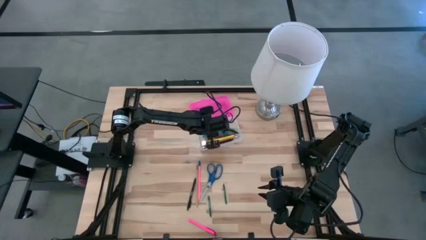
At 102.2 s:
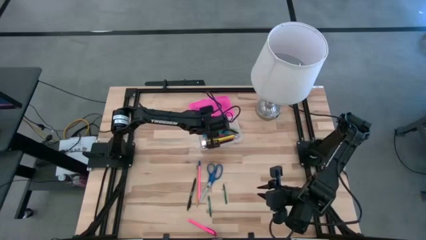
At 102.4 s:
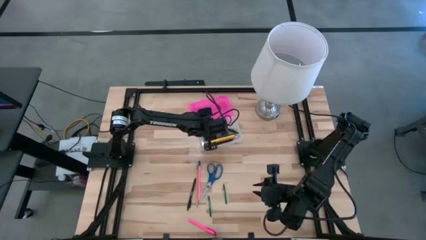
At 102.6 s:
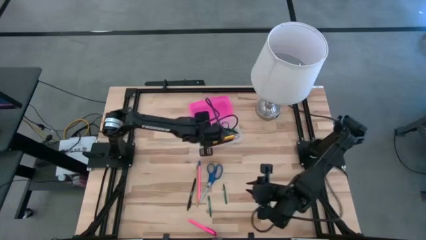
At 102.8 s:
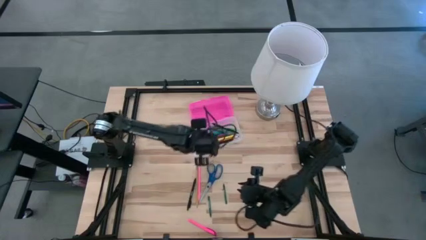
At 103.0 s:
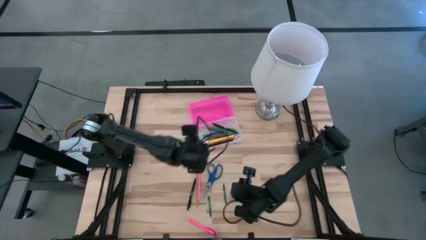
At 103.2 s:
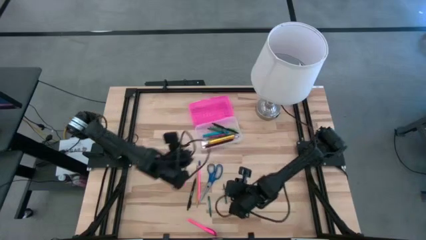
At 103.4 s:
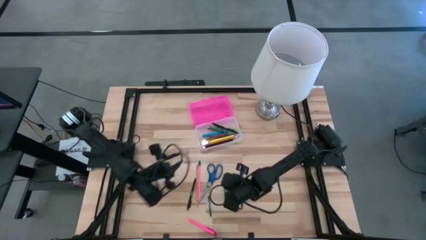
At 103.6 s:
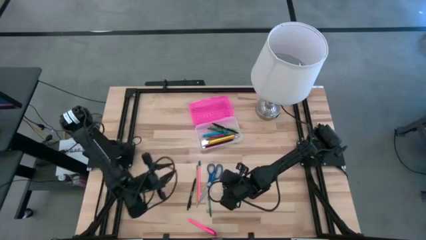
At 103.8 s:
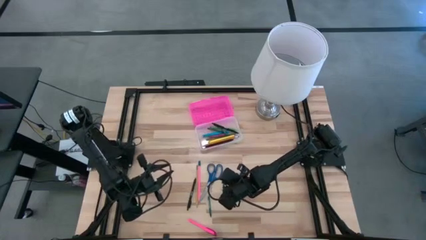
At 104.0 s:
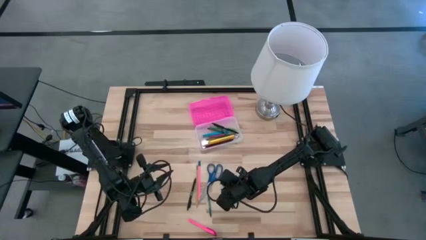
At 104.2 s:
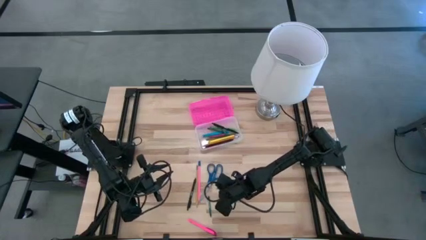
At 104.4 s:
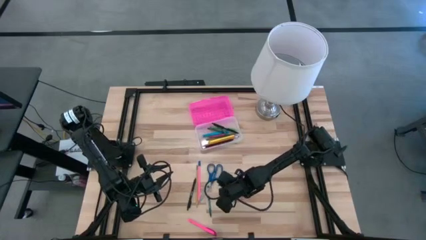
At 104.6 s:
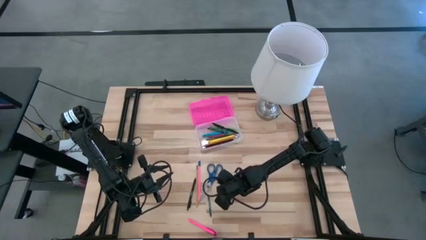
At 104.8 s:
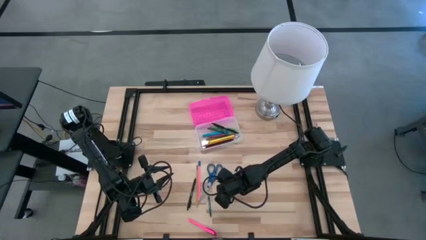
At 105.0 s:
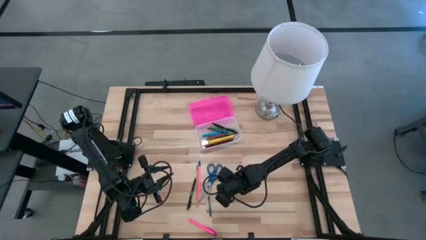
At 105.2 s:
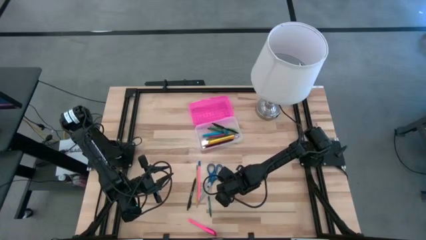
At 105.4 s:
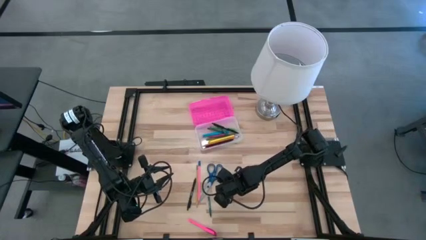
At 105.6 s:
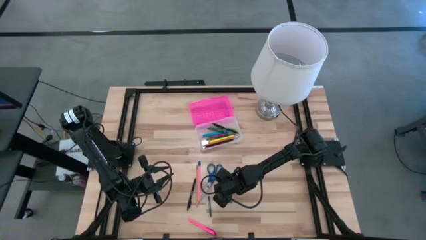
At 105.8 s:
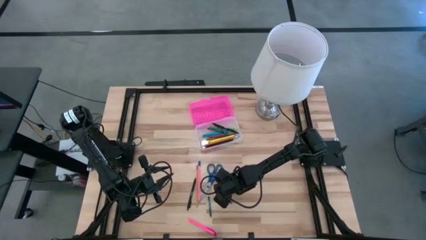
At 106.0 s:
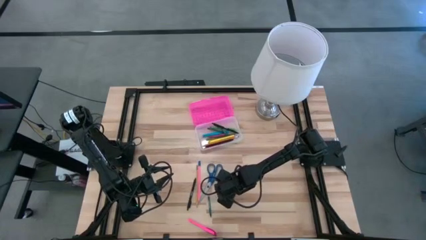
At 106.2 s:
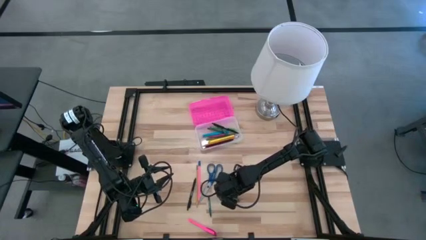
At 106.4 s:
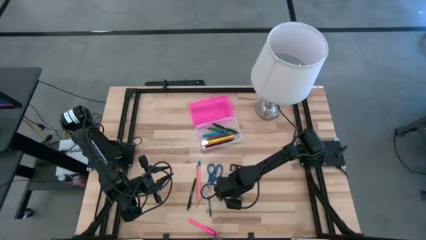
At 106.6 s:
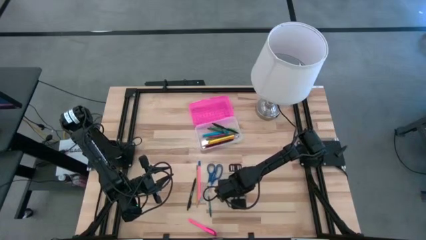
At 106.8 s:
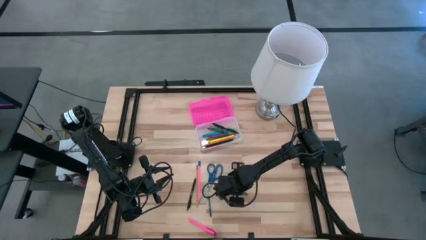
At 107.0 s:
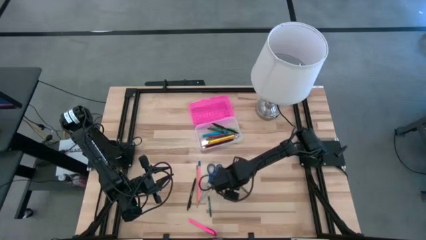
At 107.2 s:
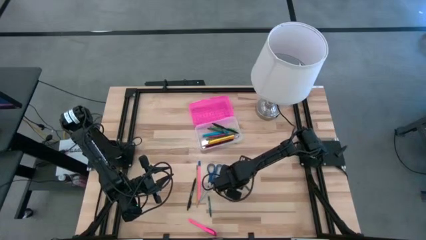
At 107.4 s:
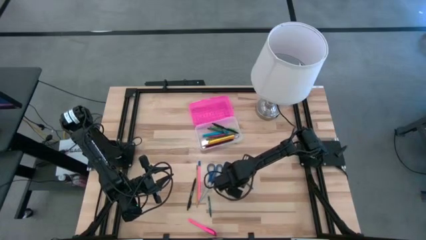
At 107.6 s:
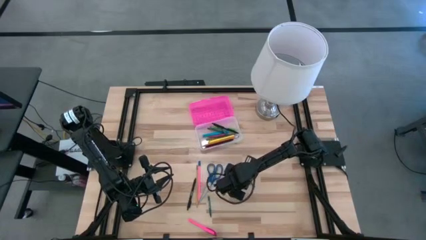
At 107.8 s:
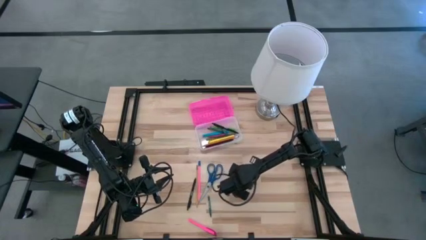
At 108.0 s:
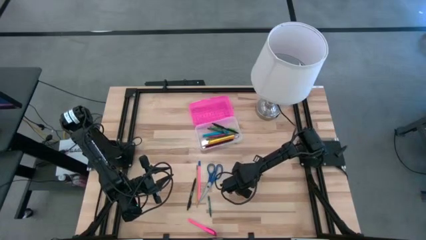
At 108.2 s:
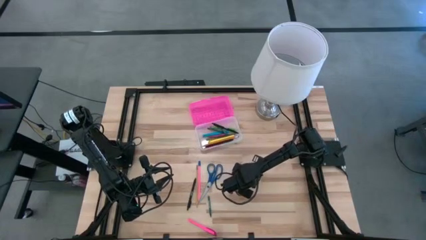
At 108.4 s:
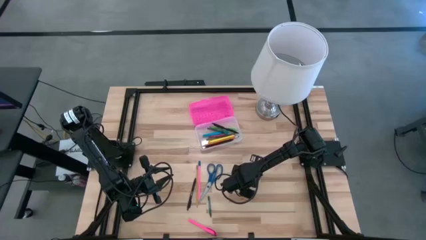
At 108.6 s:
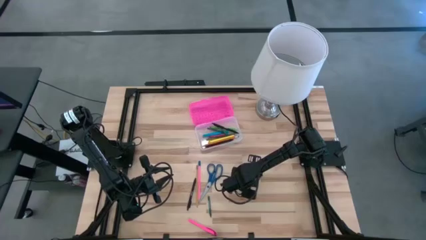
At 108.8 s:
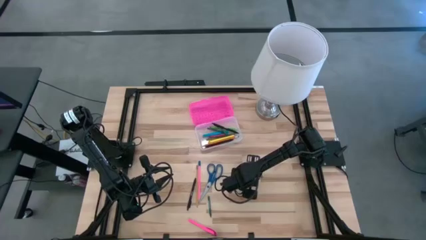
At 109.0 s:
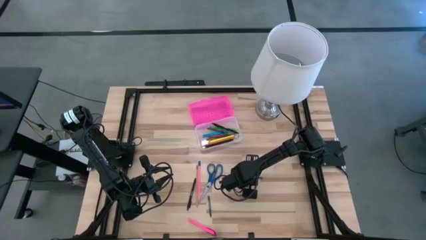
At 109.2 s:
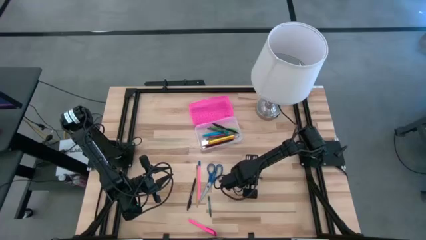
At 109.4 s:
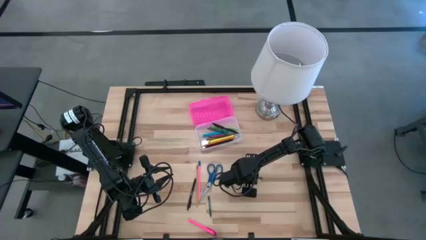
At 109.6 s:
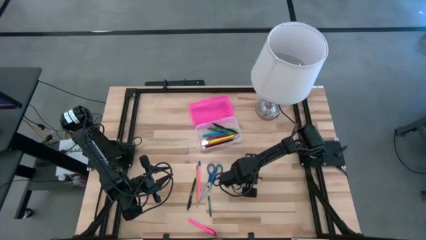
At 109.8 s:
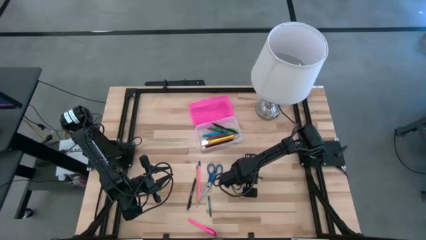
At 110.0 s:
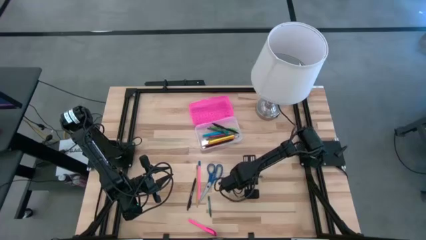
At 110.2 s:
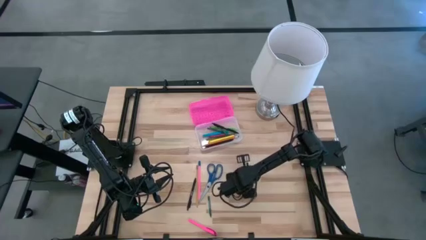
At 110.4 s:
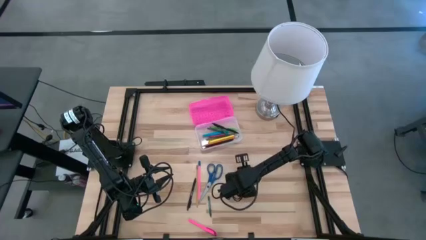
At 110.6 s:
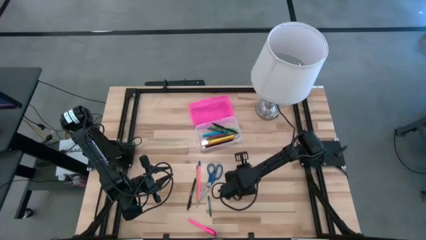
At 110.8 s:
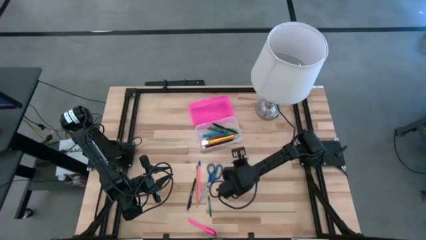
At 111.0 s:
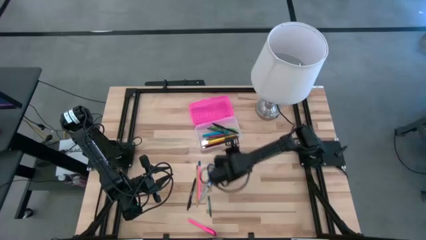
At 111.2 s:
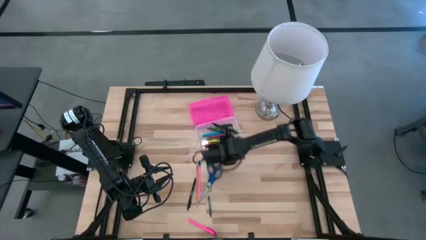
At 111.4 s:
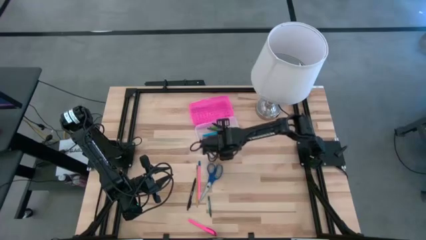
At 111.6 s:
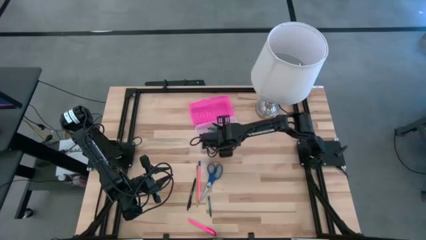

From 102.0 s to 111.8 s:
Task: Pick & place school supplies into a supply box
Put the right green crayon into the pink supply box

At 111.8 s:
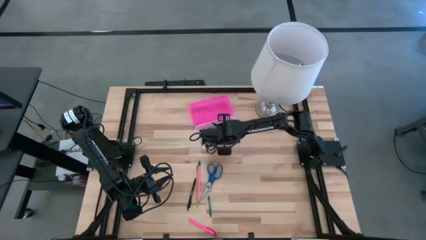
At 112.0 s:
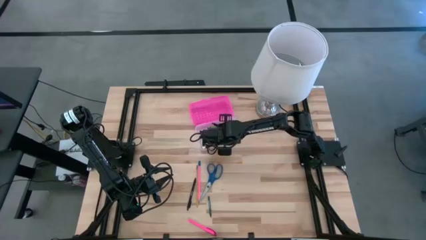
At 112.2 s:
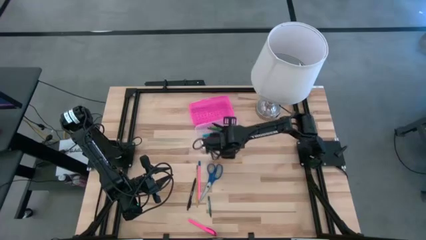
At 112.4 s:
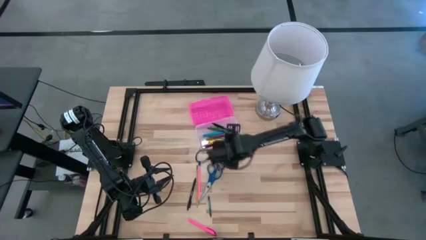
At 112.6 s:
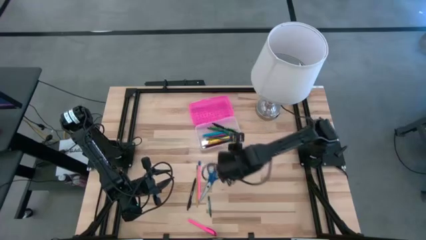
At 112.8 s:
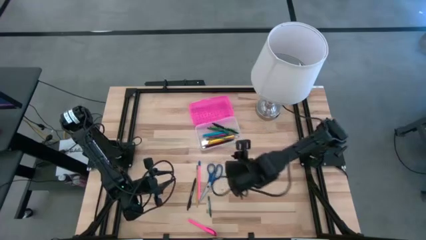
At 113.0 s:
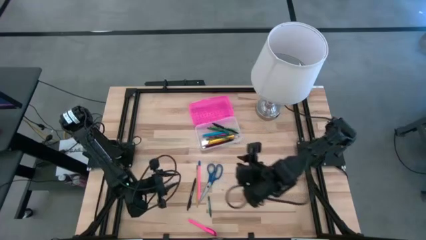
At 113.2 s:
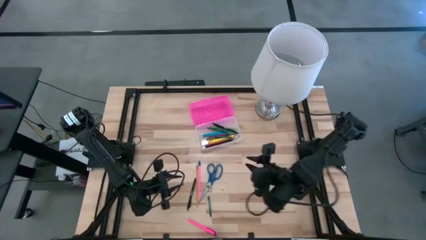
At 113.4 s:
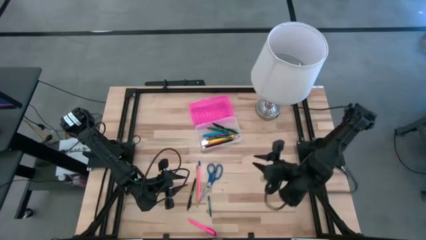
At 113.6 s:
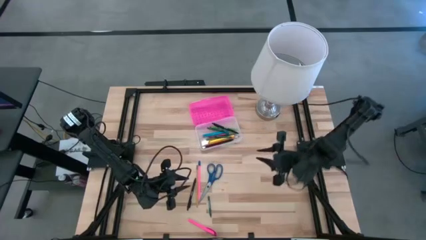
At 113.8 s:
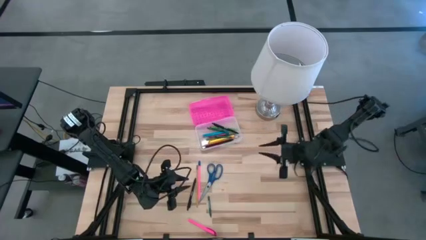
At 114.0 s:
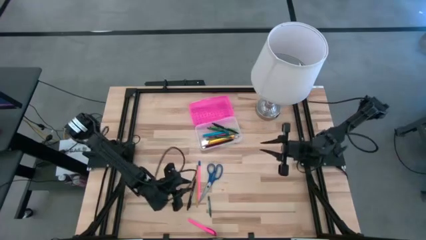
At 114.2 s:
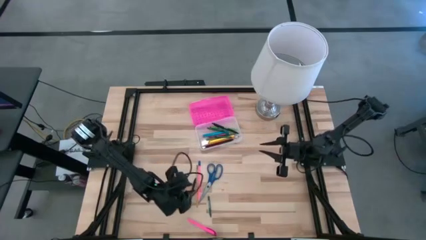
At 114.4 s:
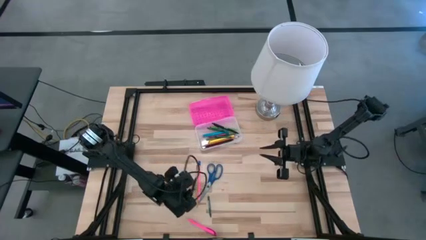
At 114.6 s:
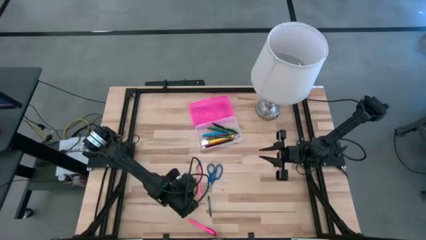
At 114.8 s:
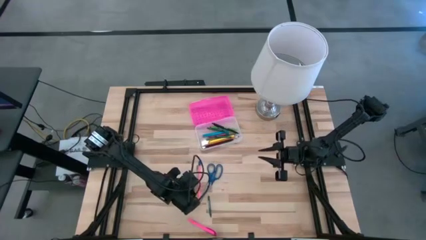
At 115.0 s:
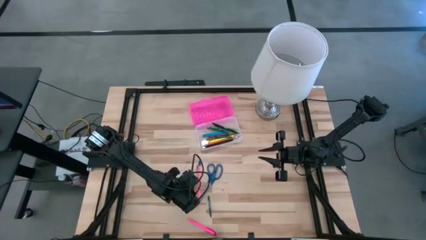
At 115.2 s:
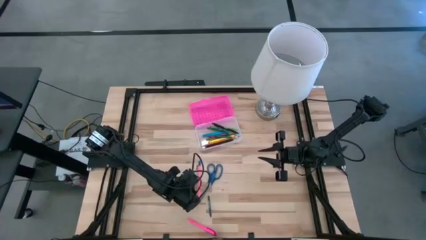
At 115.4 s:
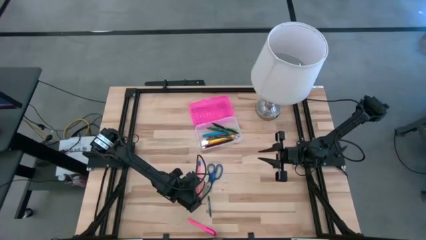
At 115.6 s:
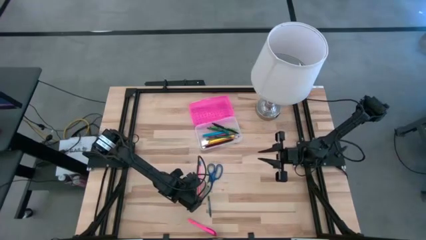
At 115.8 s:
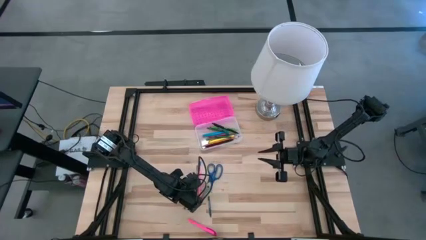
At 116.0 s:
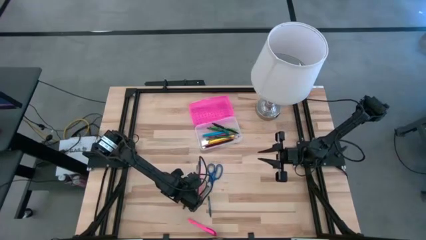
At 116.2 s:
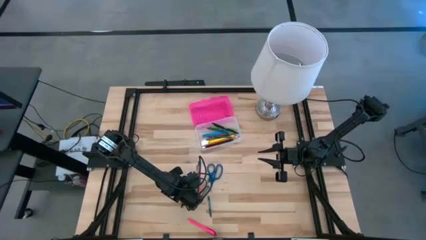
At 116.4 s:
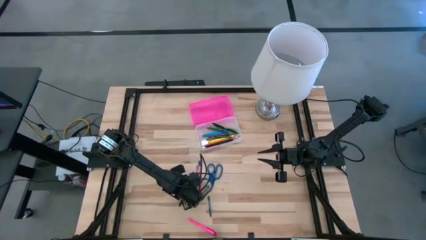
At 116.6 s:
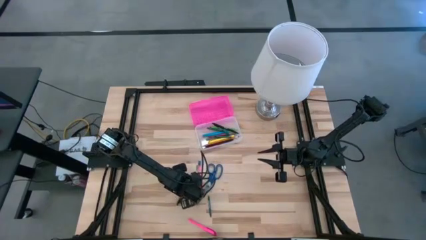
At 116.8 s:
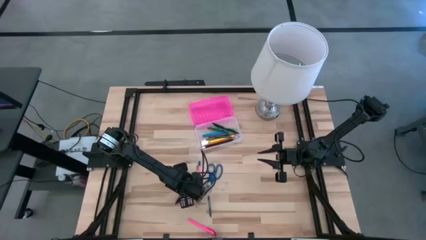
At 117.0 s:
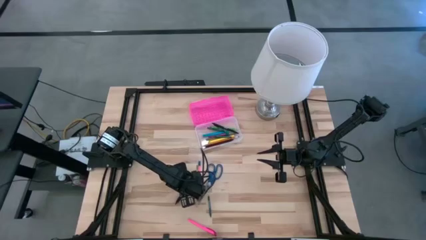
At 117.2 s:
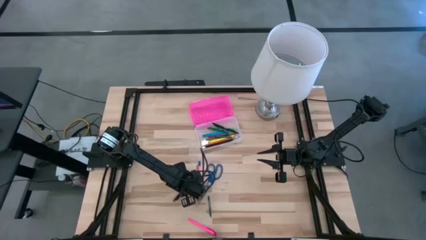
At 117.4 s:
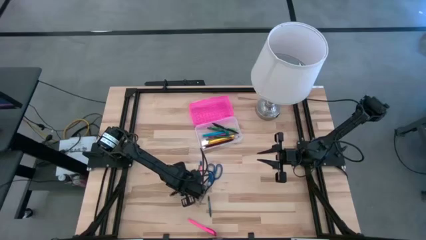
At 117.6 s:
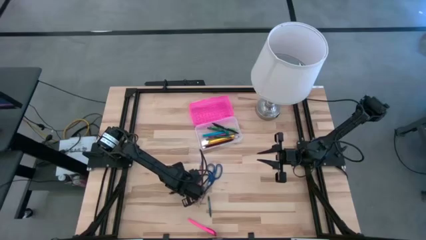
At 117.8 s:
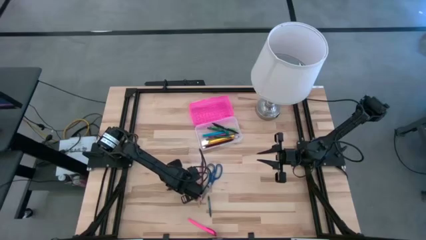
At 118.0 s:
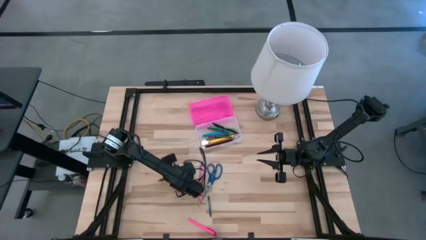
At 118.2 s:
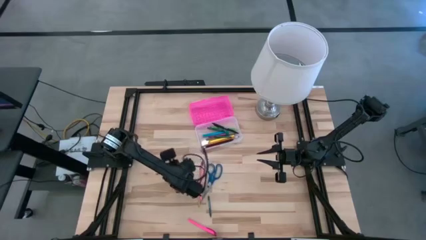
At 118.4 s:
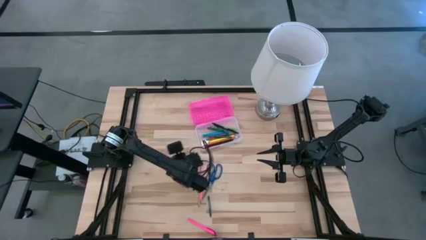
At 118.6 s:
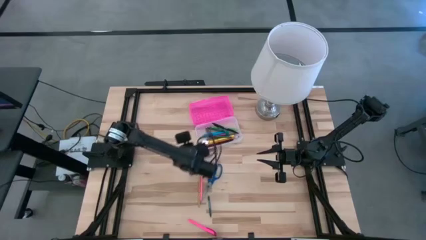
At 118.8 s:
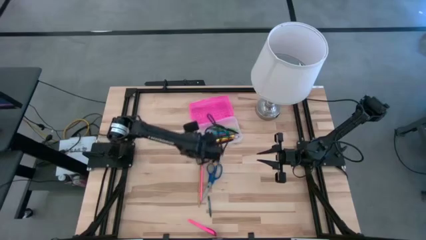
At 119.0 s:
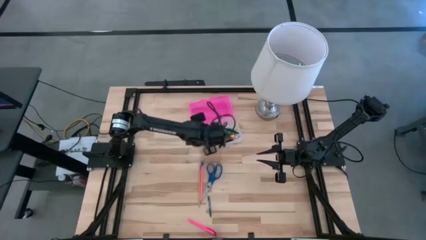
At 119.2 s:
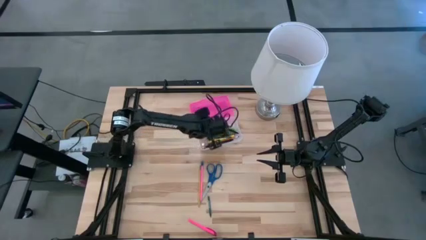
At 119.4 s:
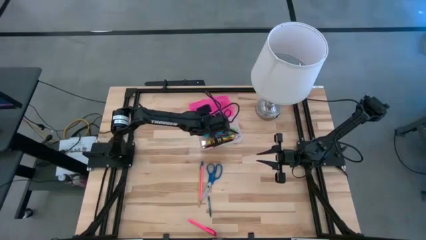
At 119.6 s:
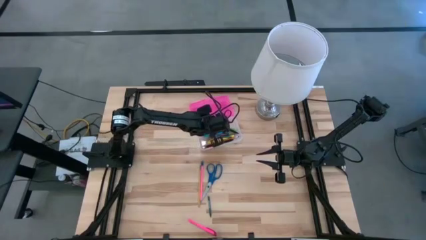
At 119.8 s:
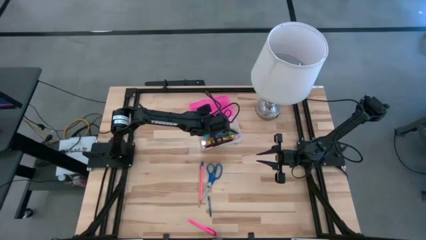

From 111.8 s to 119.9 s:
Put the black pen into the pink supply box
